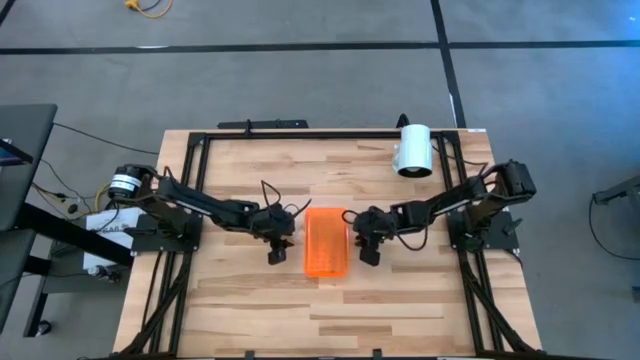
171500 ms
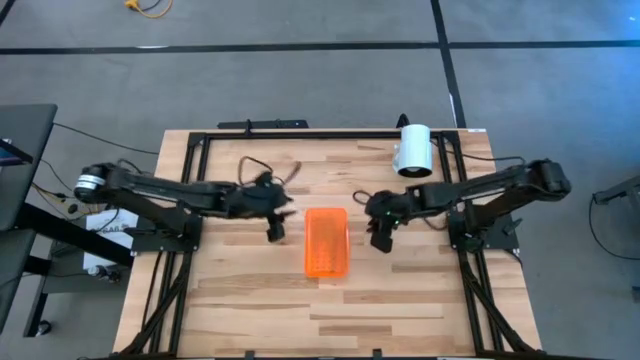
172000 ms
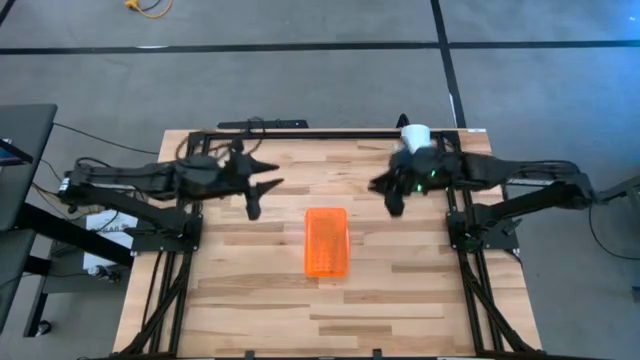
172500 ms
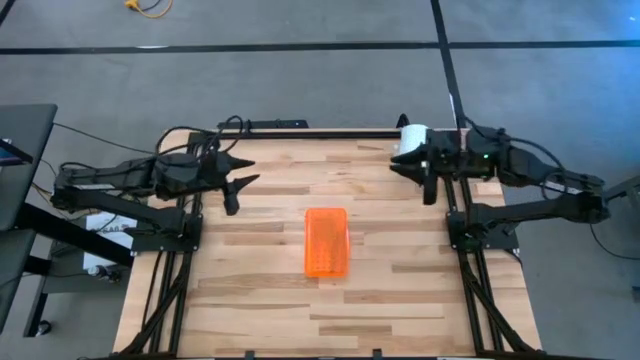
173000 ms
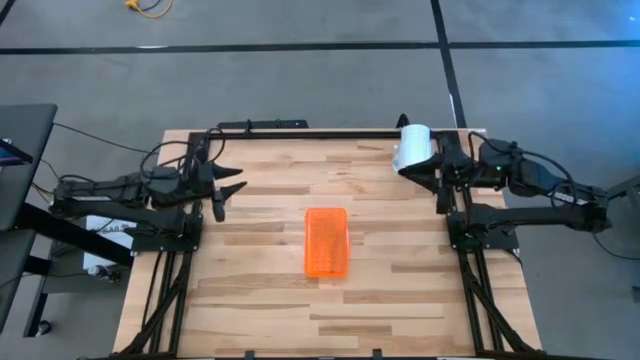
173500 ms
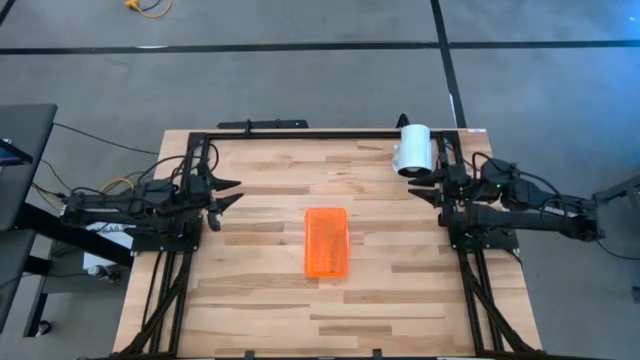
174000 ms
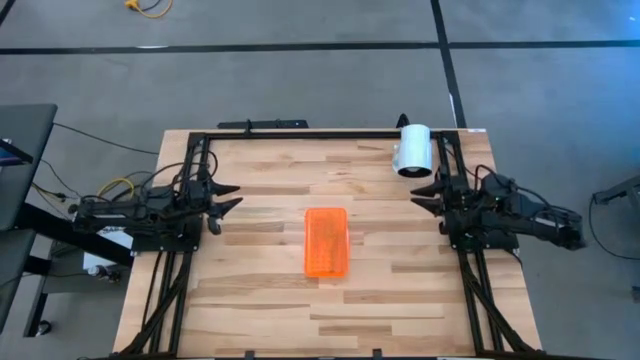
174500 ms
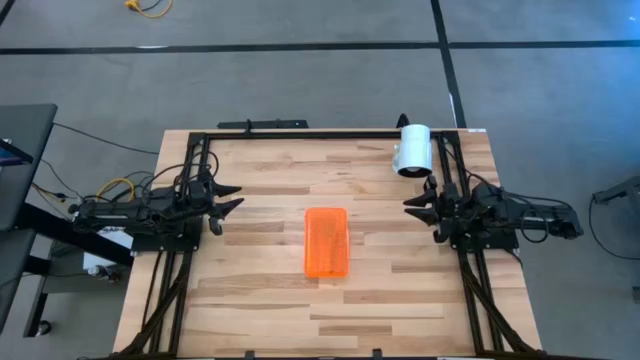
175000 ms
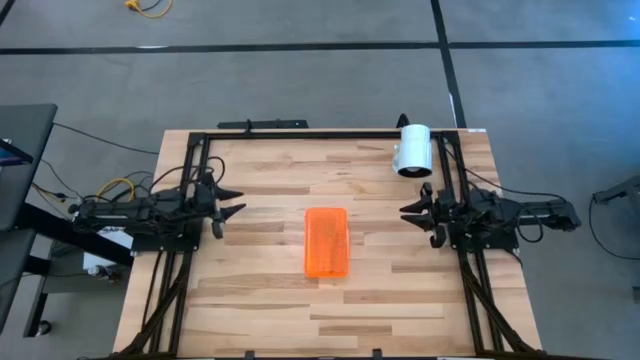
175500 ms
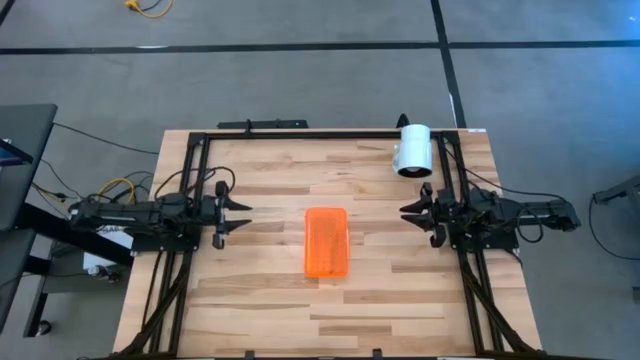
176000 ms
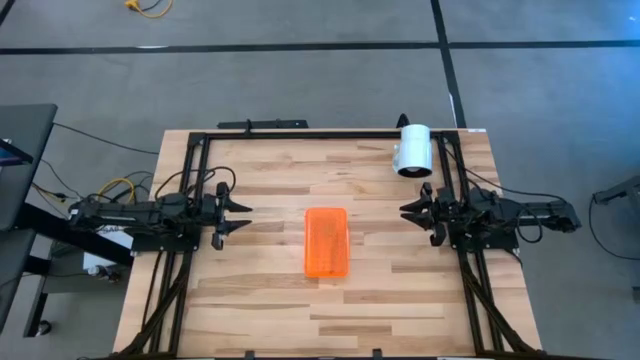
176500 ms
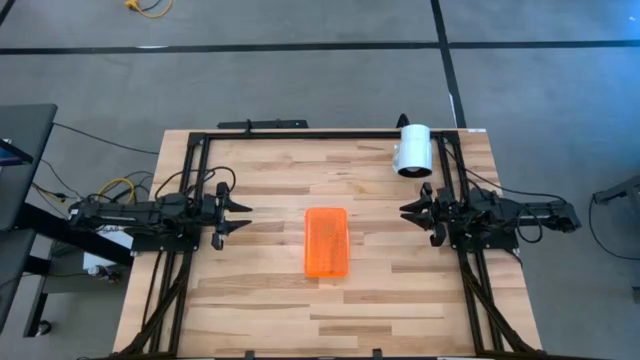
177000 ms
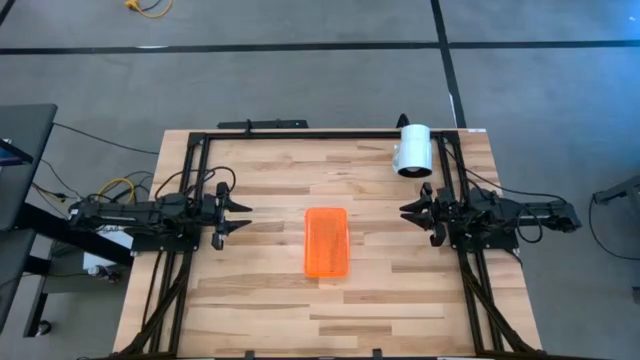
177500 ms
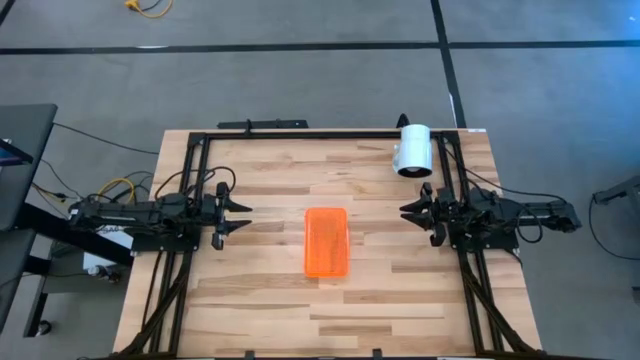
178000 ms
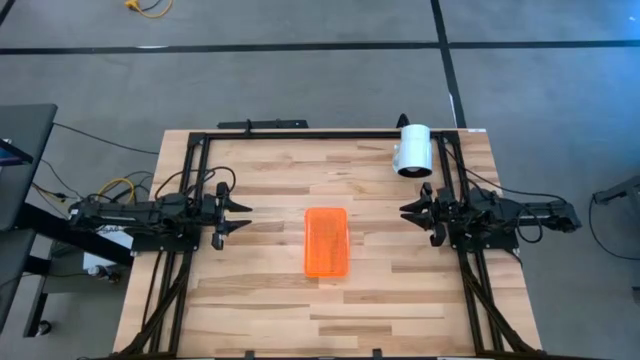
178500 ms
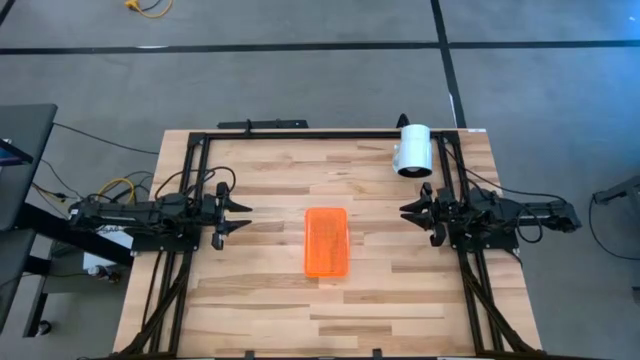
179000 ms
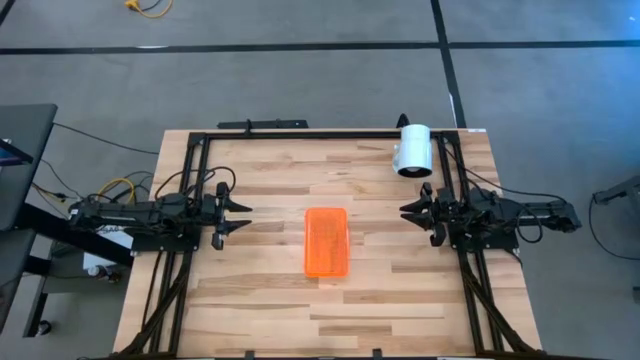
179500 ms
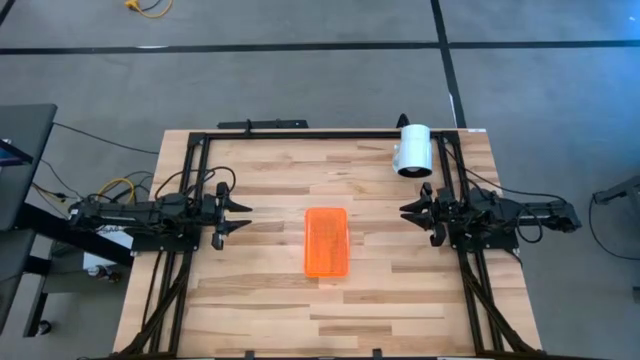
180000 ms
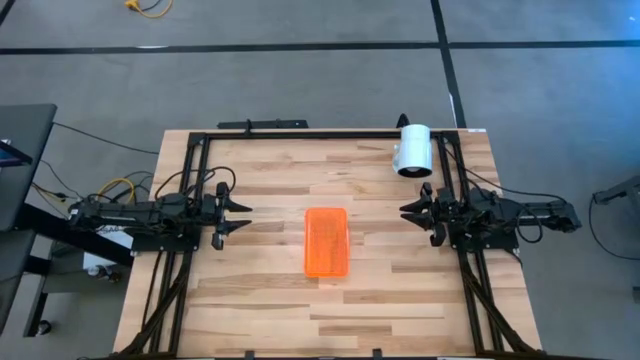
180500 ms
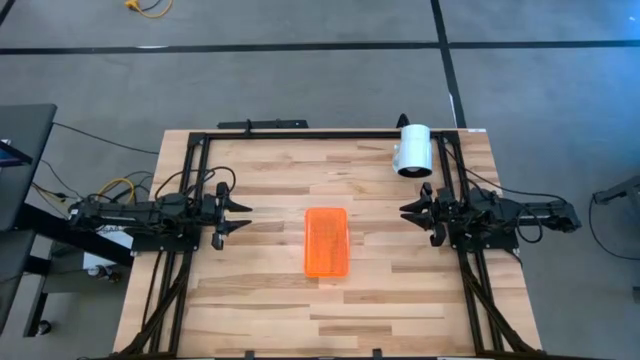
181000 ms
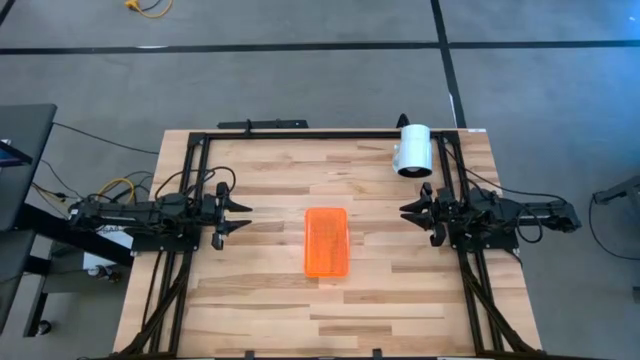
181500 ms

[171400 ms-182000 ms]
Task: Pick & place school supplies into a supply box
Return to Home Position

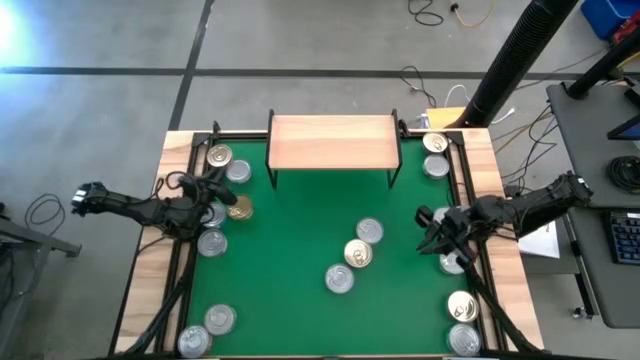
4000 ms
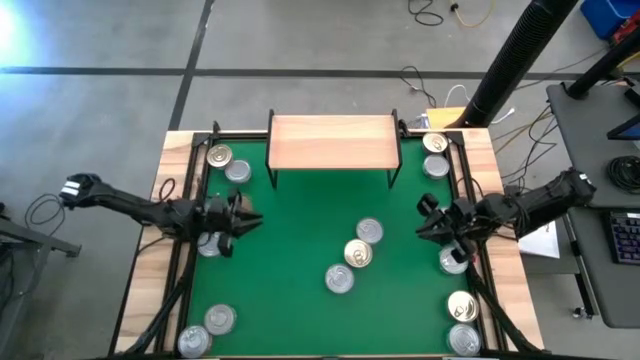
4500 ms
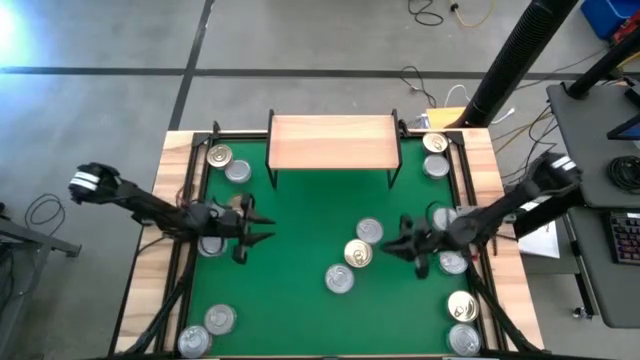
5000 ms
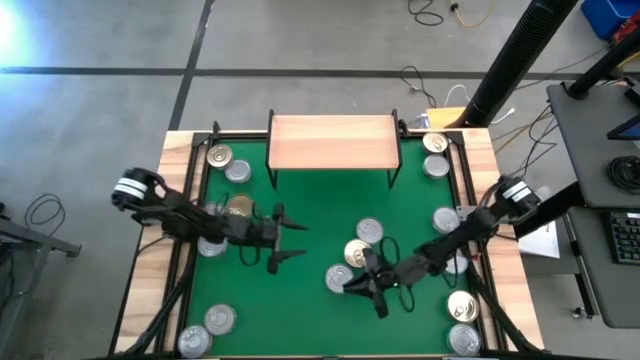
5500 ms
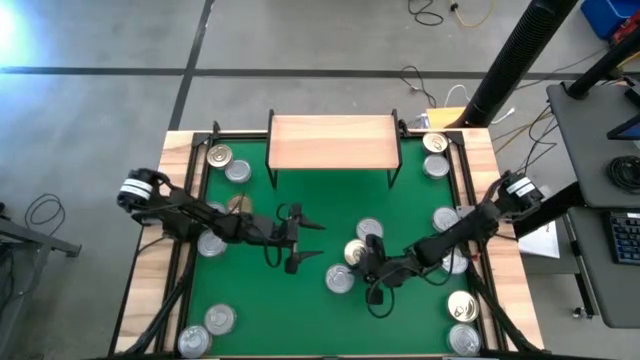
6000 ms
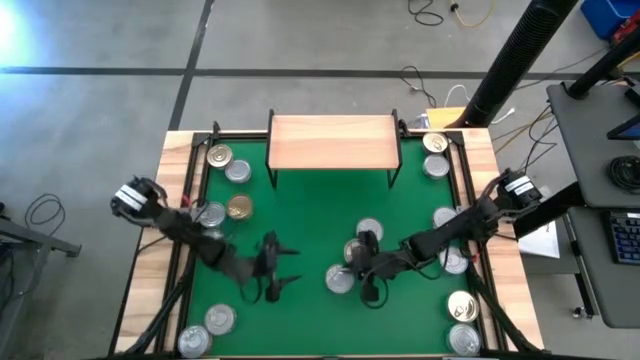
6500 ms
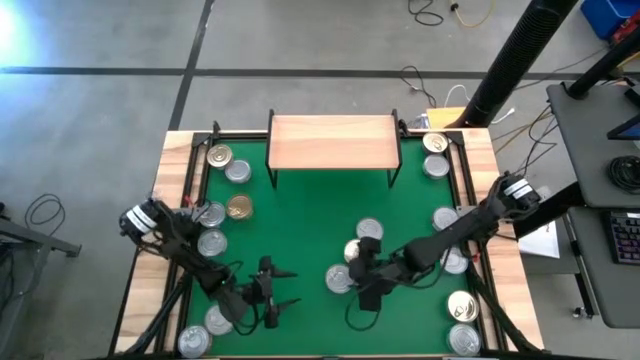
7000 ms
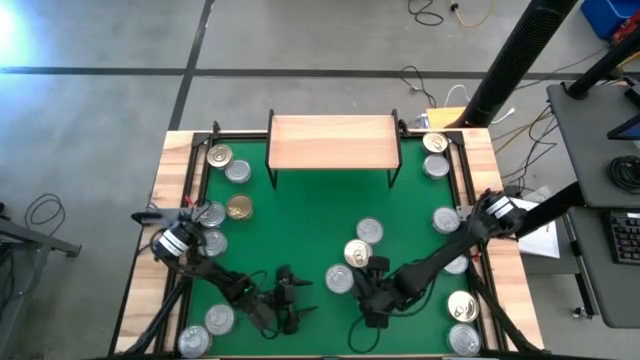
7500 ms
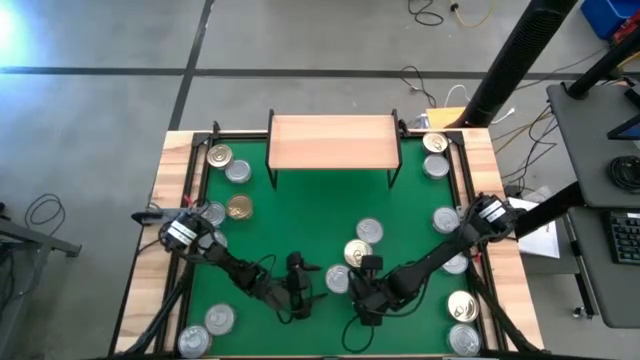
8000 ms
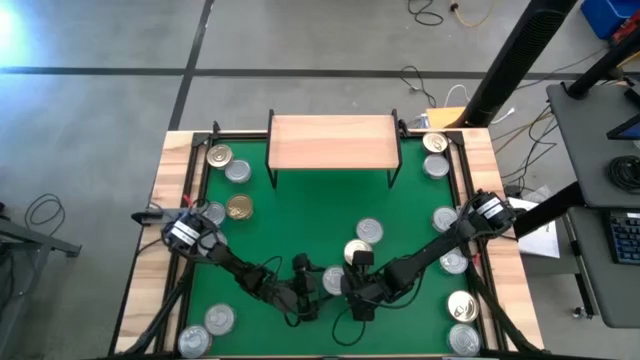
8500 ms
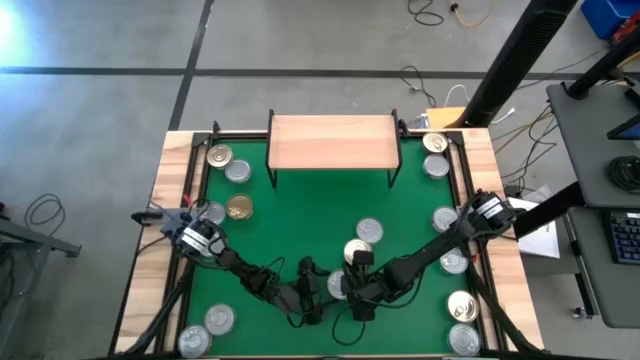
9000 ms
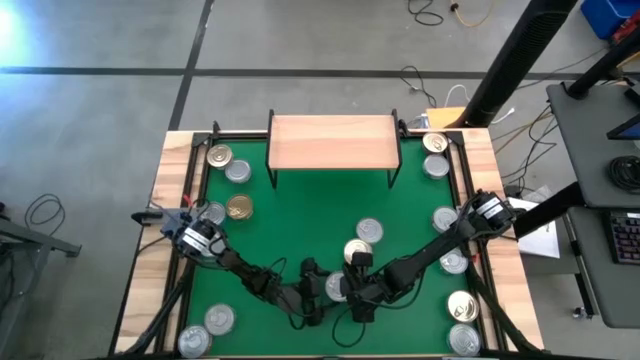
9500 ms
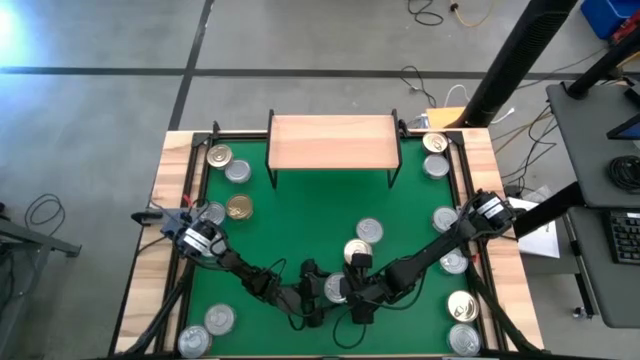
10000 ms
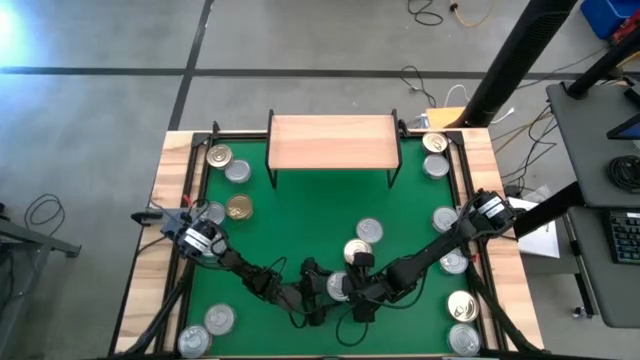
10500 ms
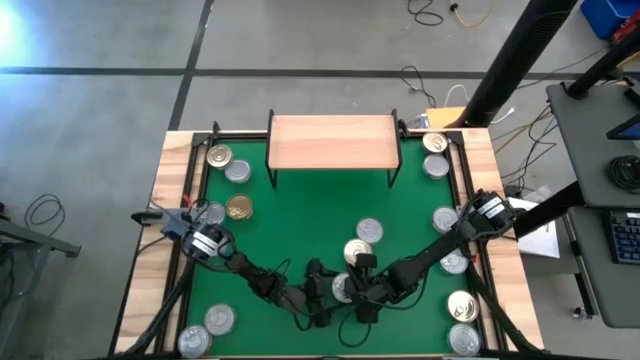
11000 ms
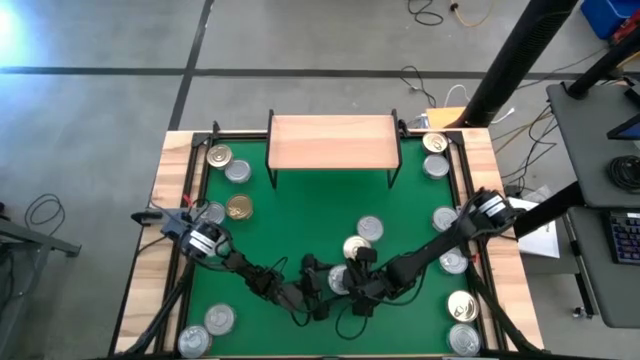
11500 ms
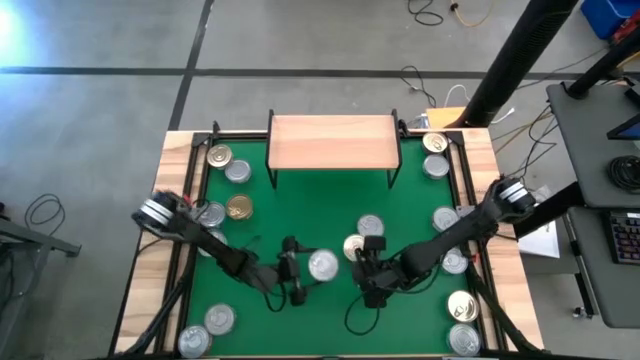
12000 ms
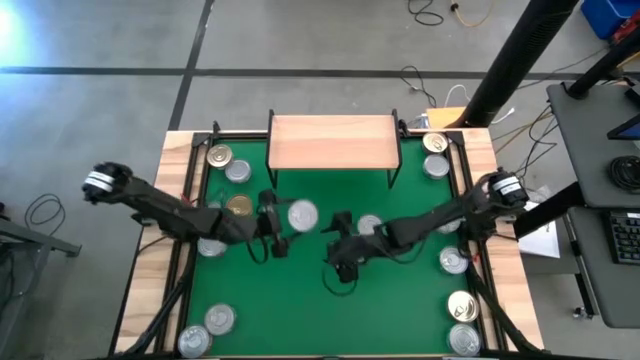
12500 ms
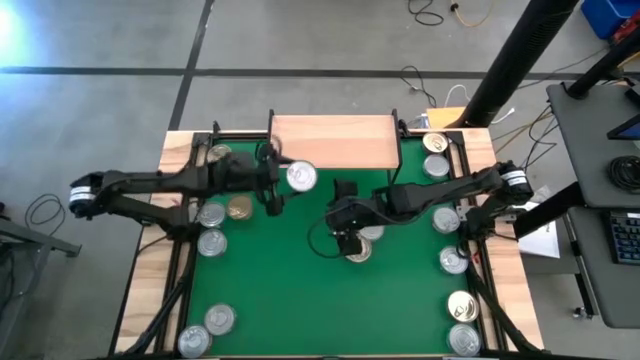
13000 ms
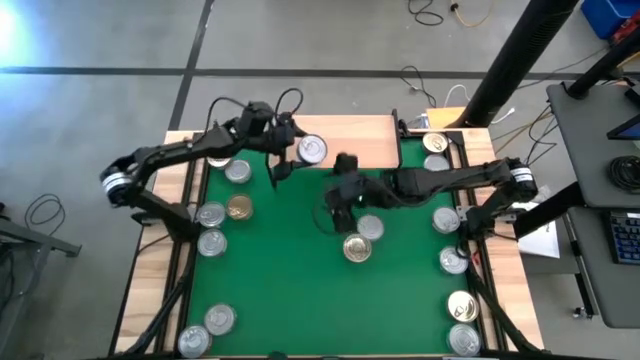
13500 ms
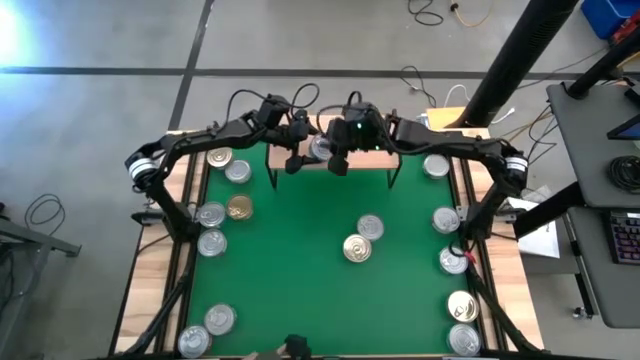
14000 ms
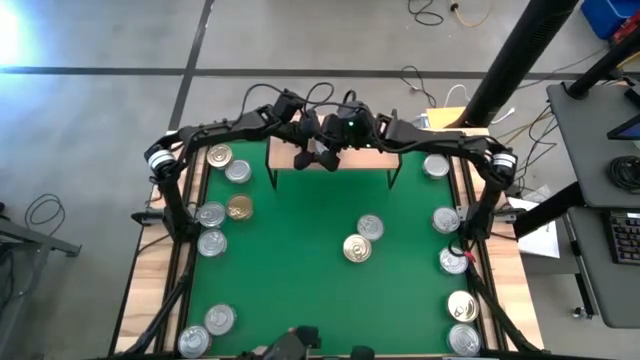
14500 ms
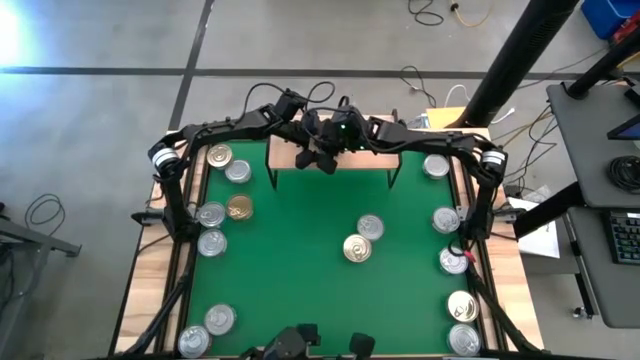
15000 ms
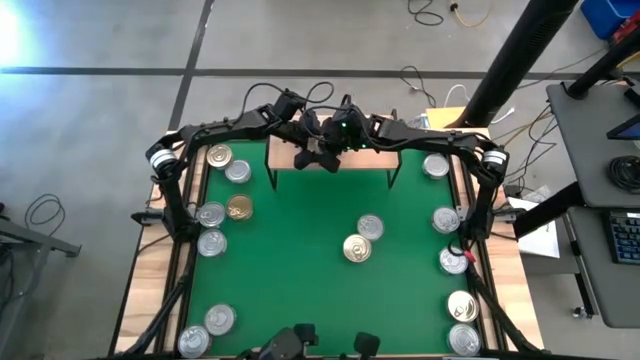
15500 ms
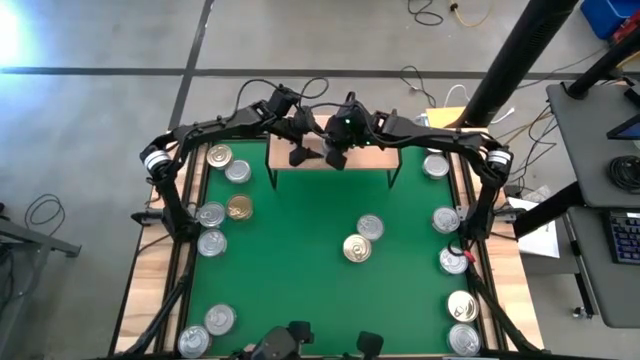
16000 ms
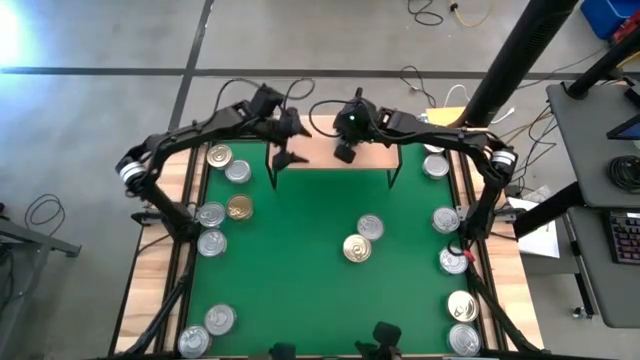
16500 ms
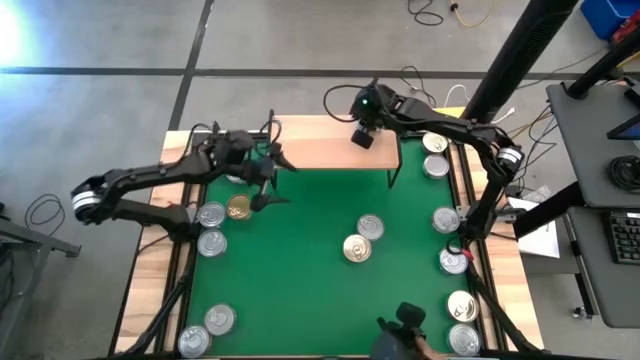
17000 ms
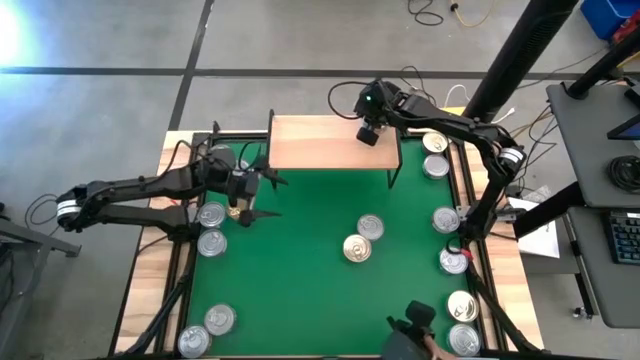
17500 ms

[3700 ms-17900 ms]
Task: Stack canned seafood by type on shelf
Put the green blue tuna can on the shelf
